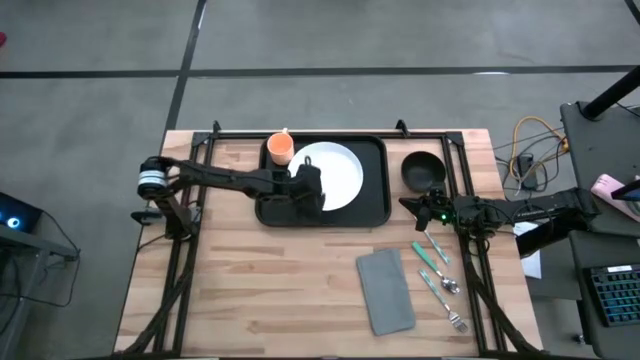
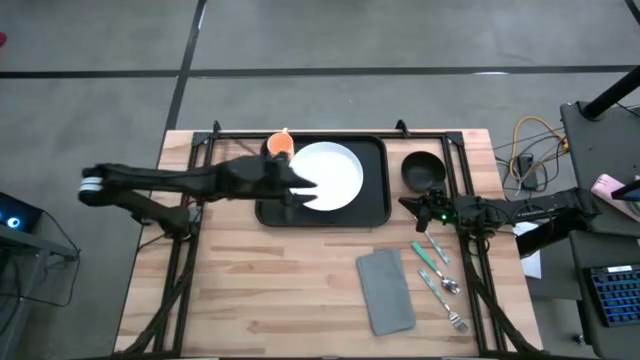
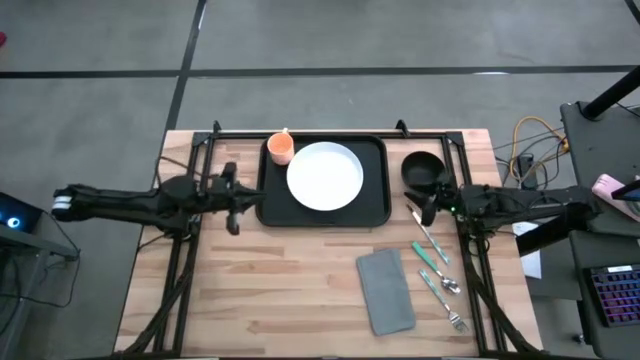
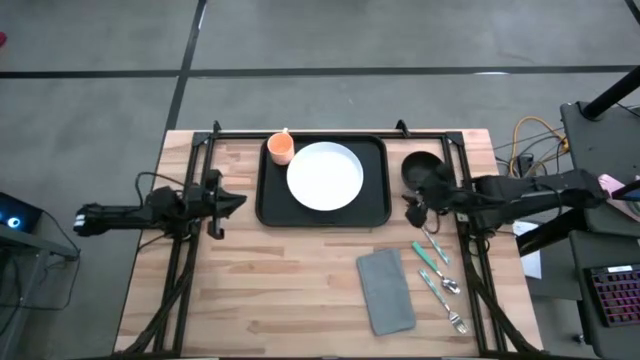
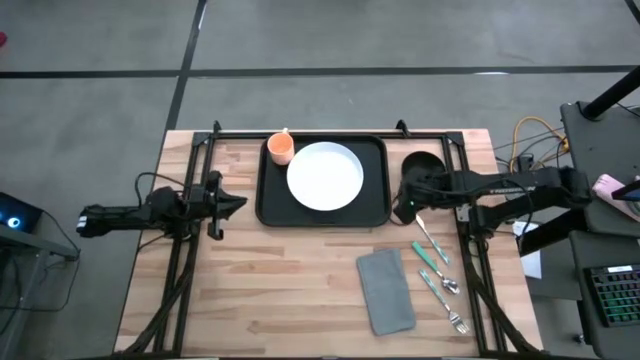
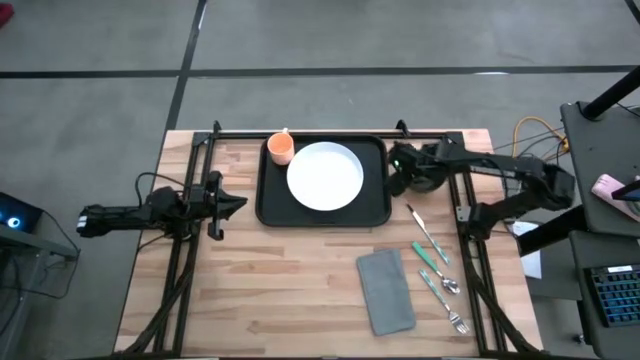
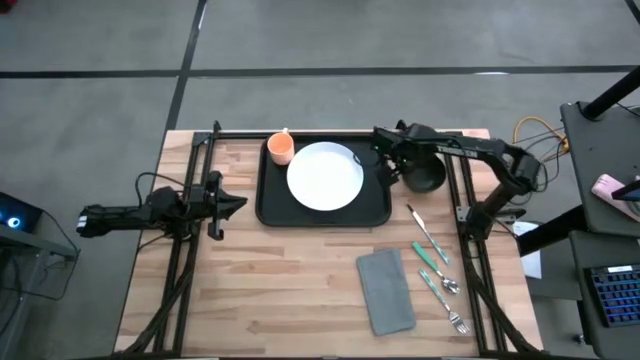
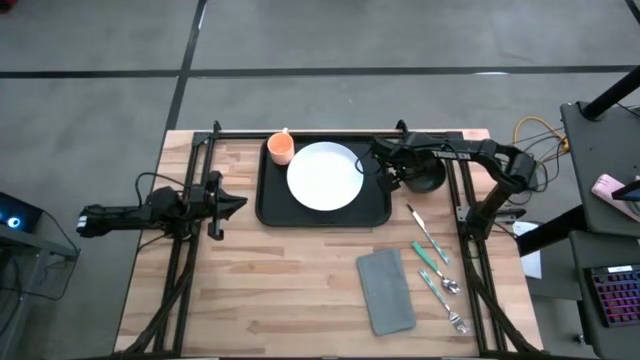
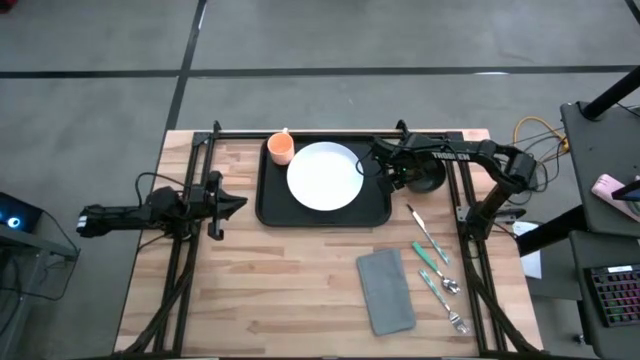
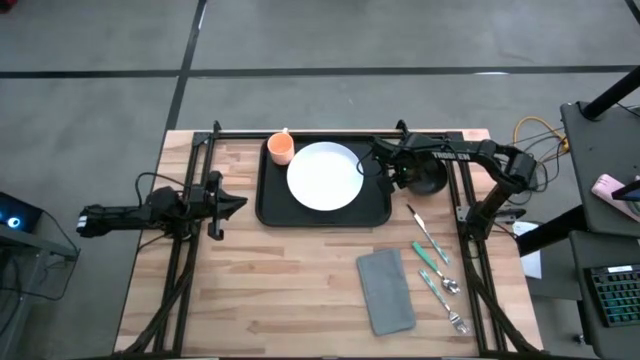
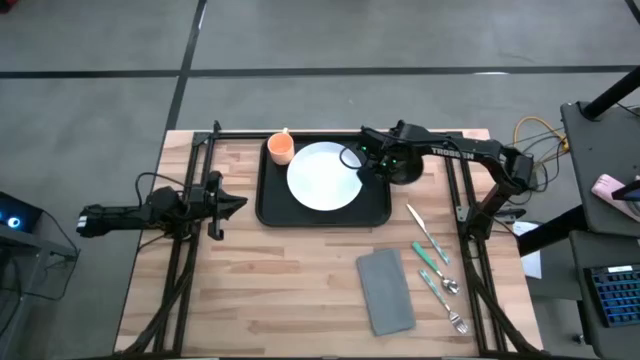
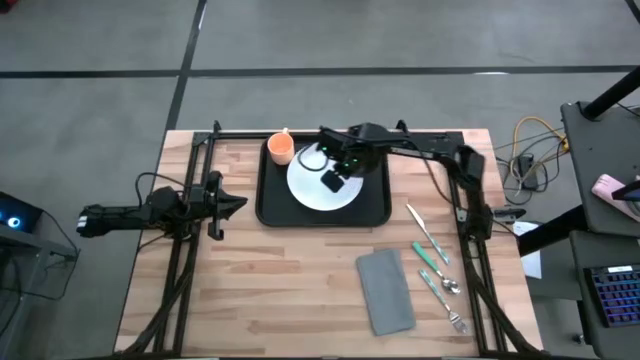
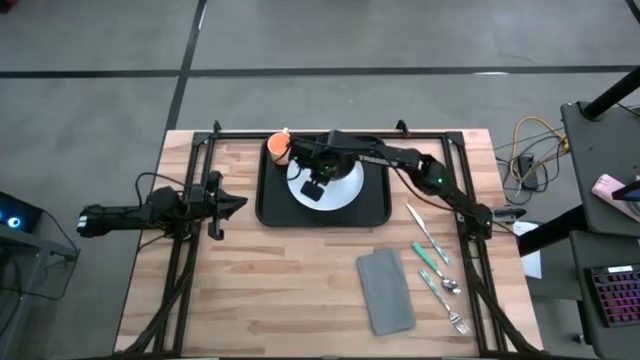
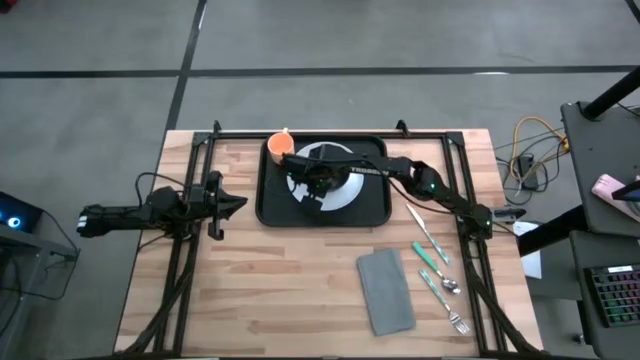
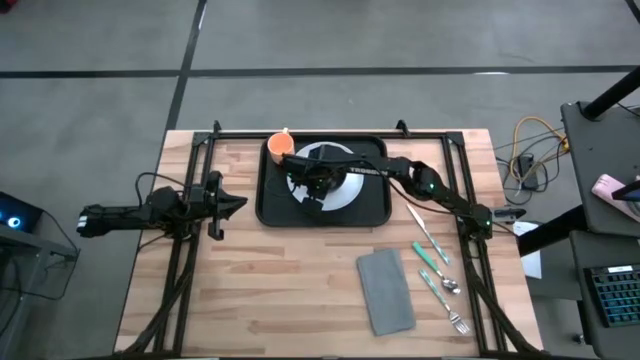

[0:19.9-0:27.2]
Task: Set up tray
Put the black bowl on the white plate

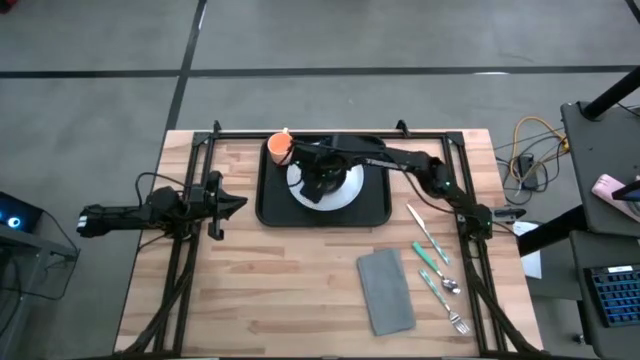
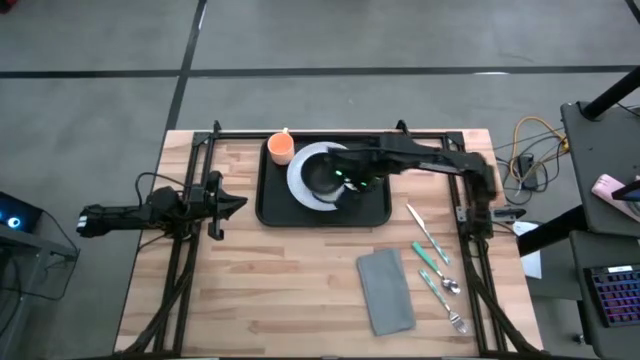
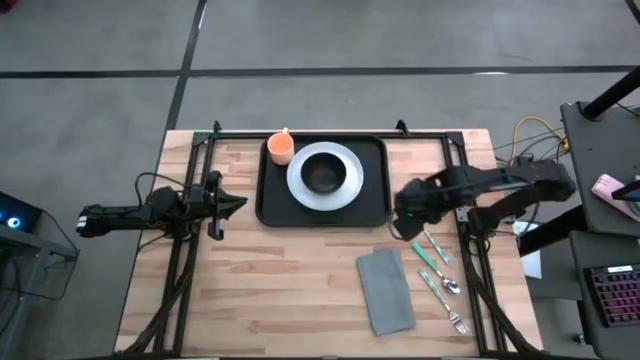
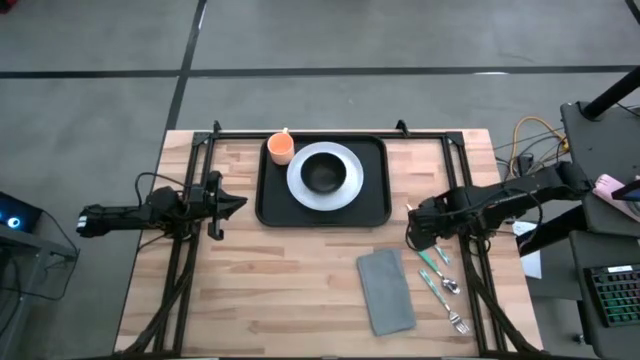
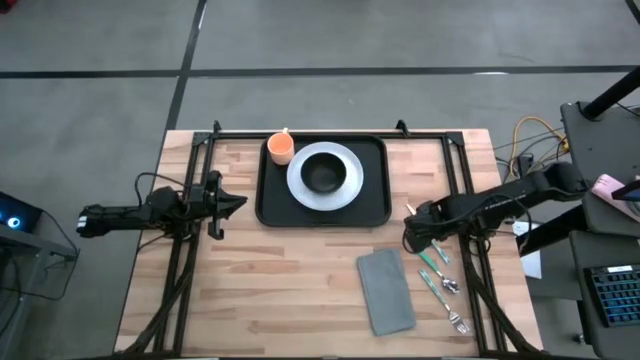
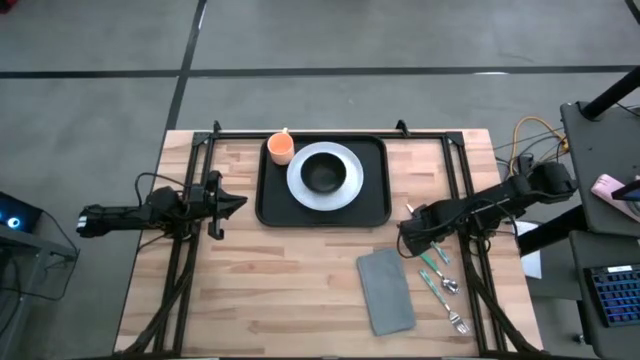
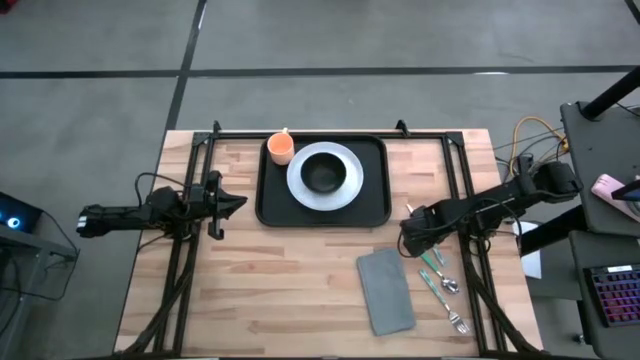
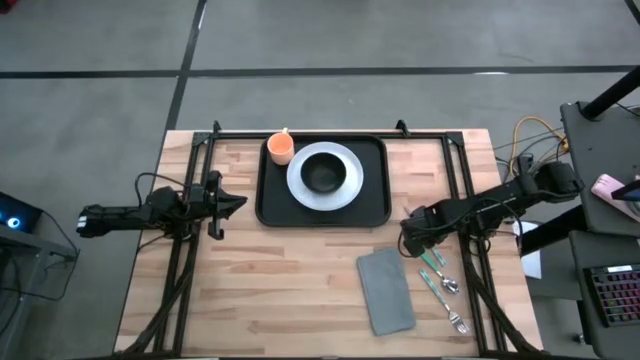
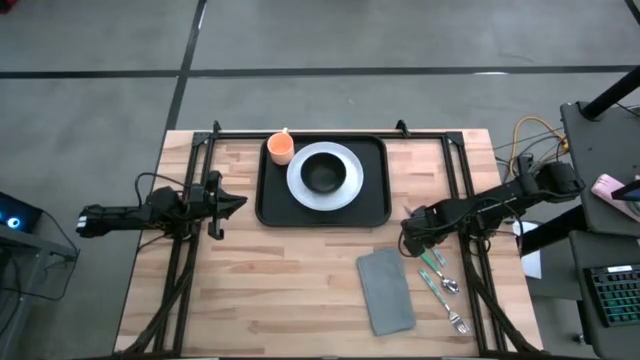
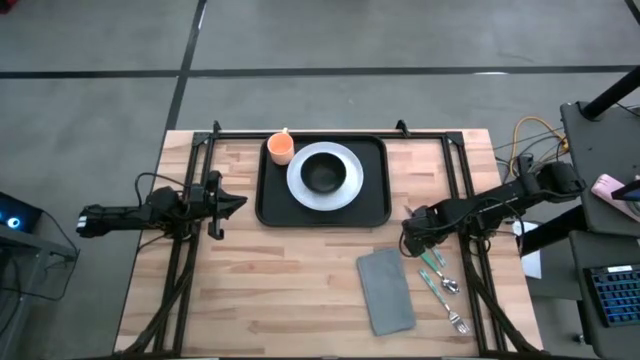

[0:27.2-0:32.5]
Put the green patterned knife on the black serving tray

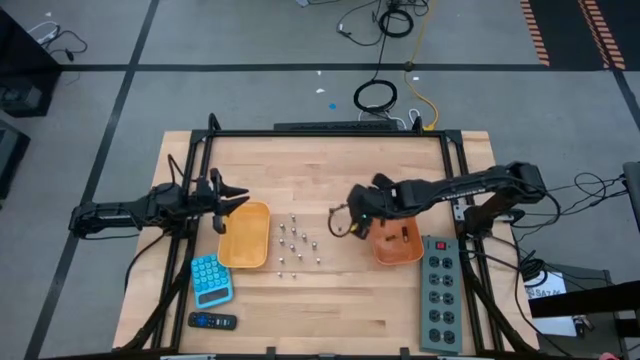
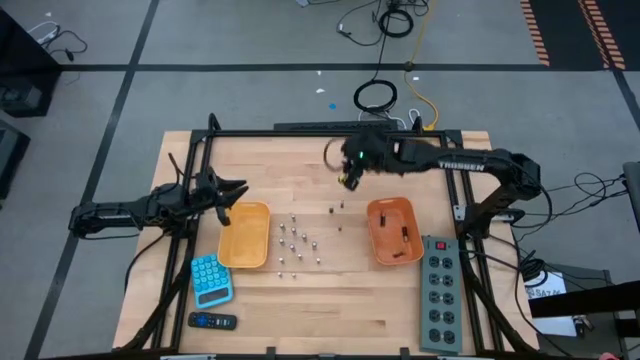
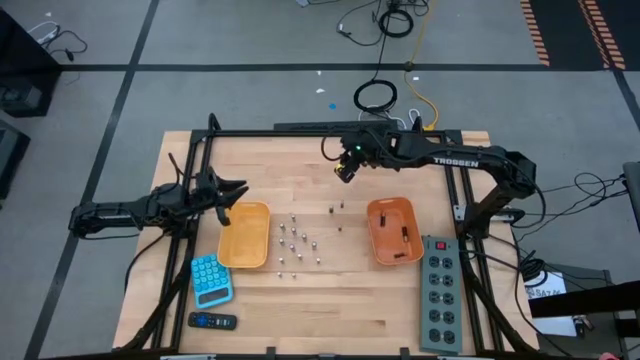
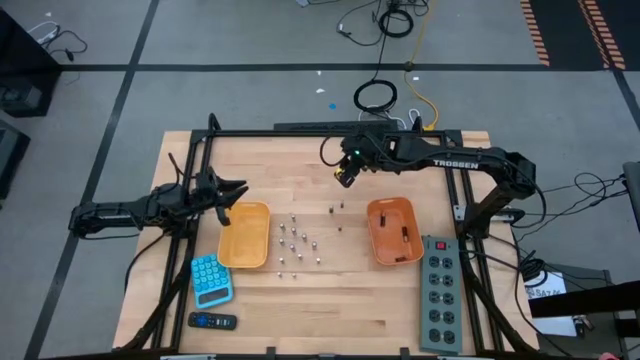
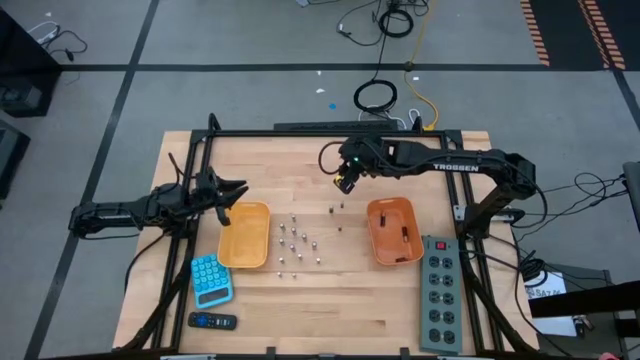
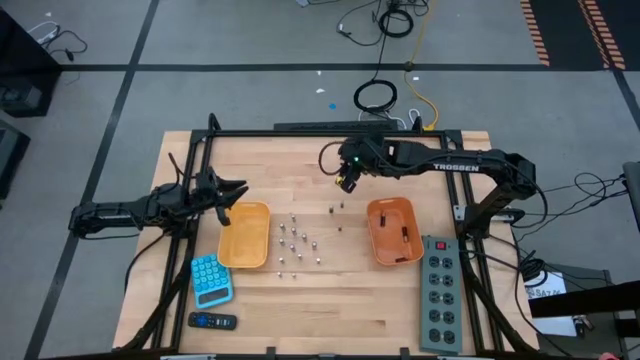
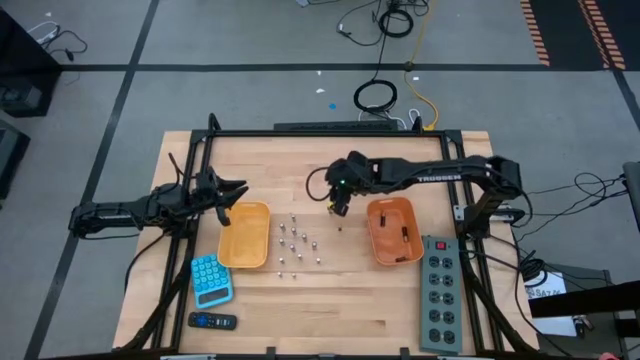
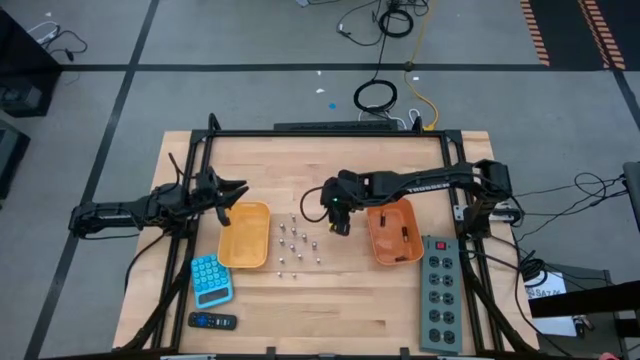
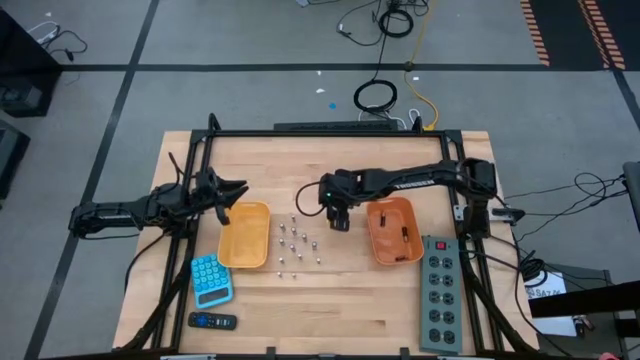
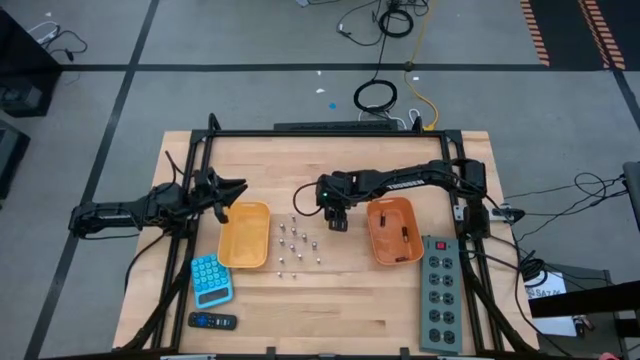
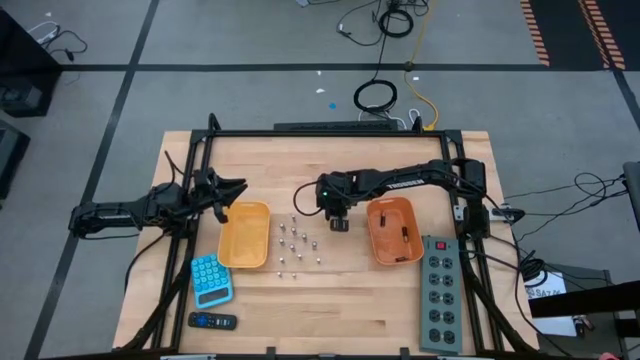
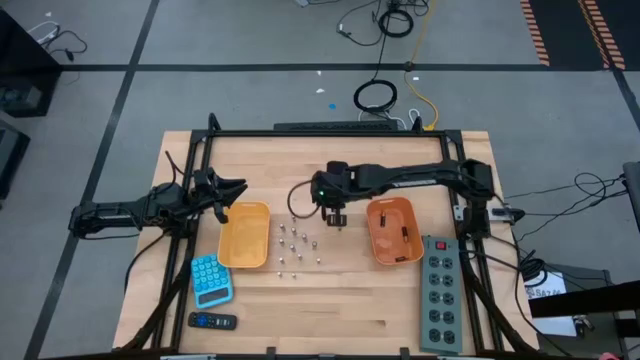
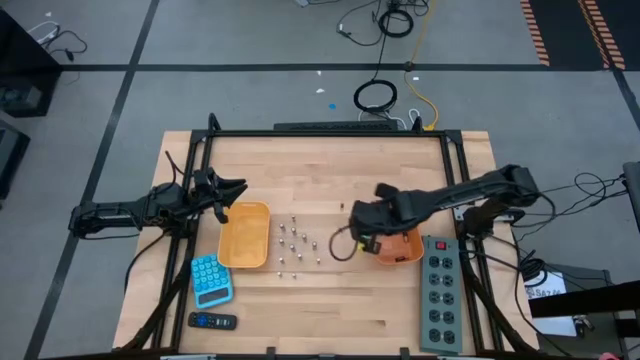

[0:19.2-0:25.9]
Task: Sort batteries
Put the black battery into the orange bin

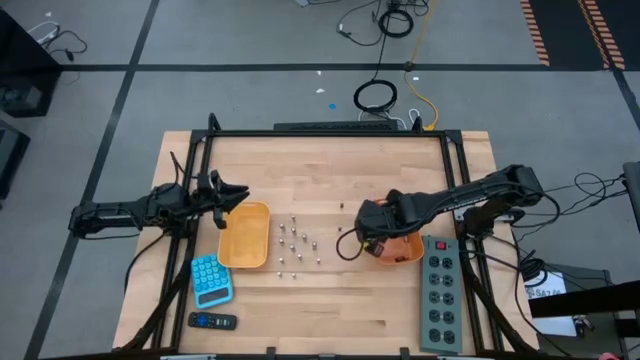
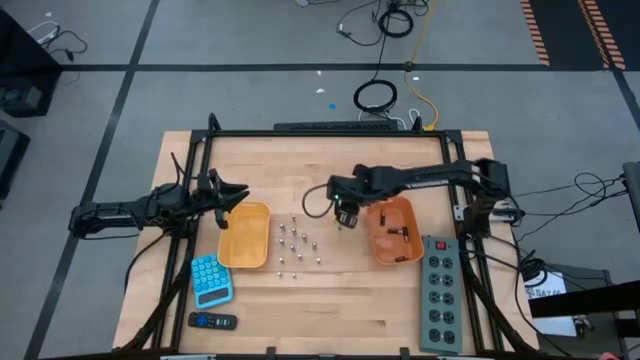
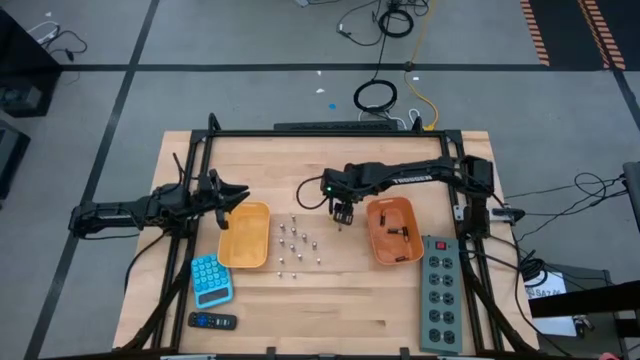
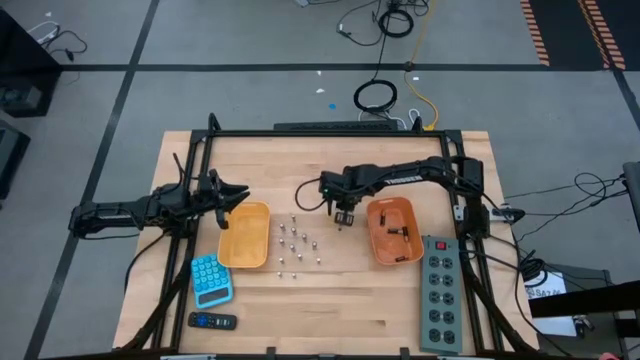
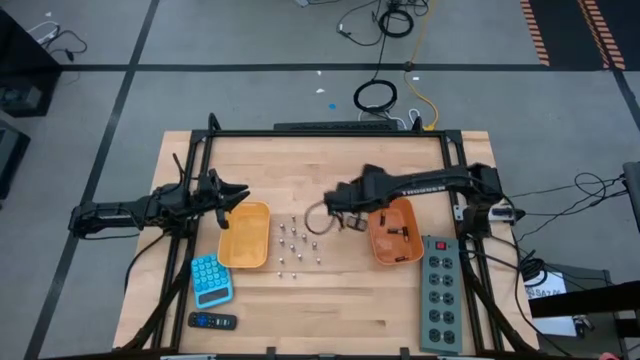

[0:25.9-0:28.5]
Put the black battery into the orange bin

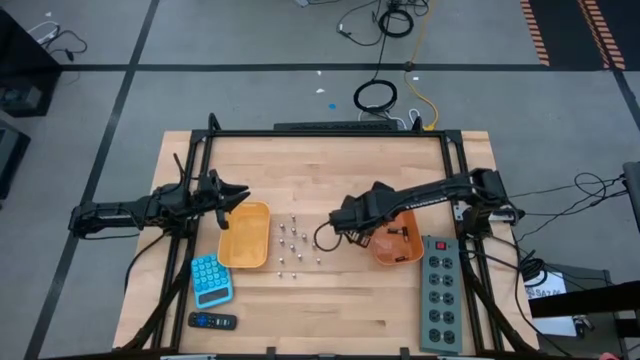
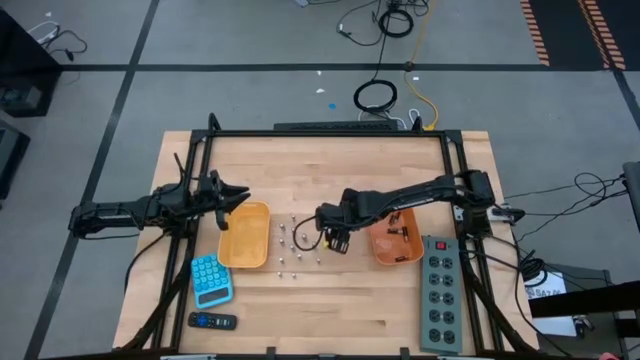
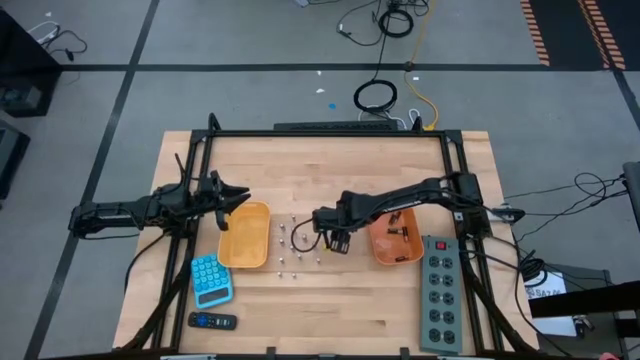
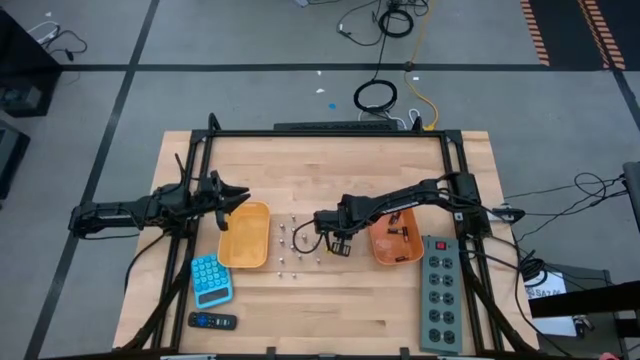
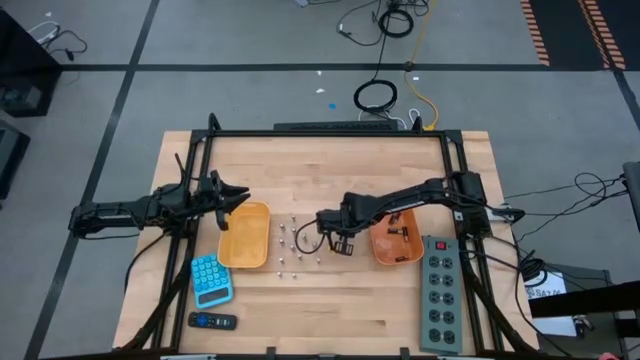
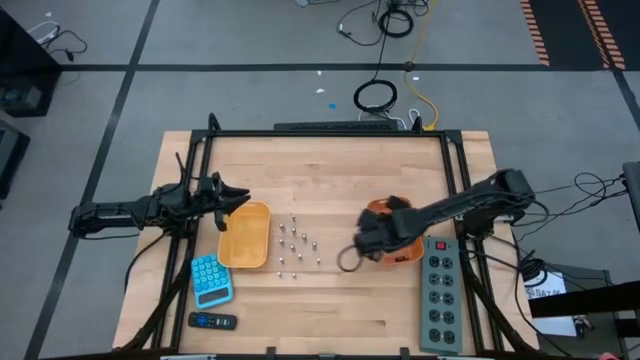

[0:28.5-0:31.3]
Put the black battery into the orange bin
